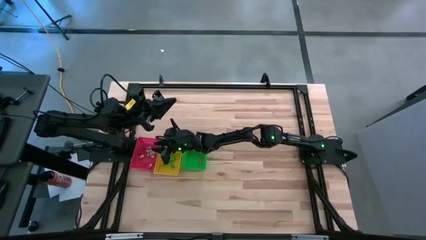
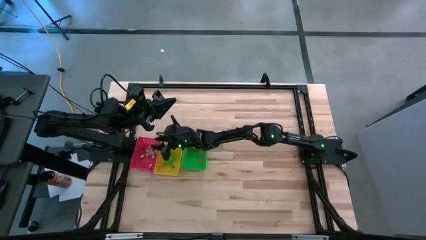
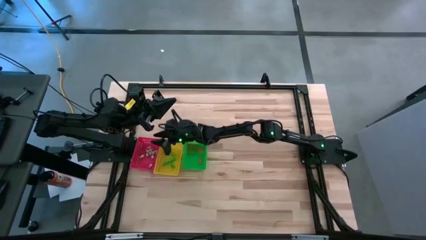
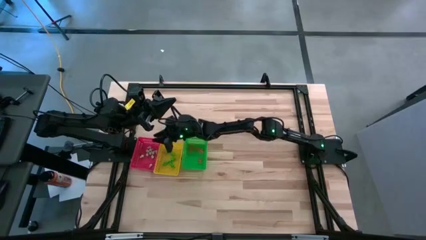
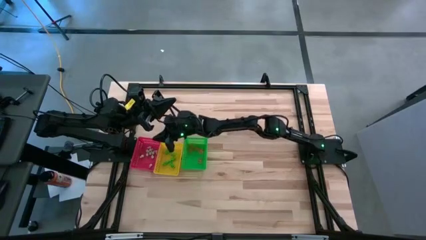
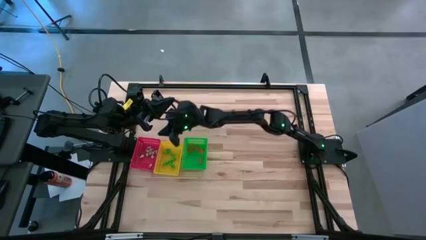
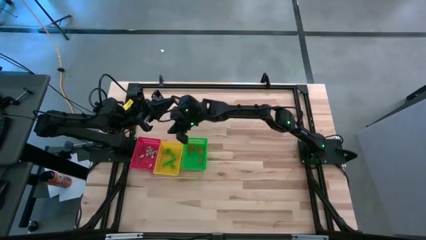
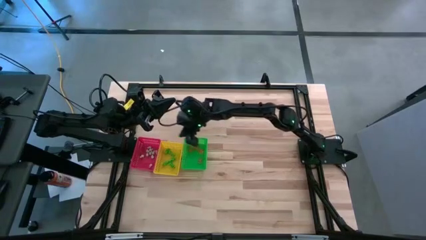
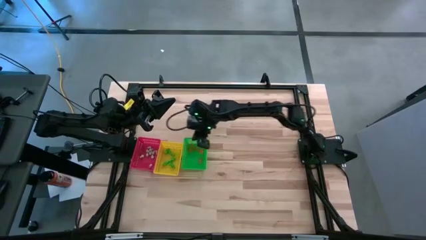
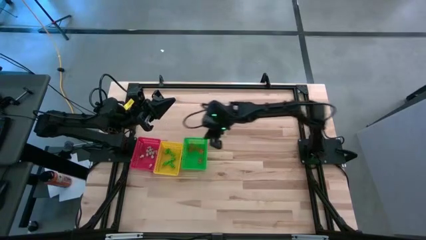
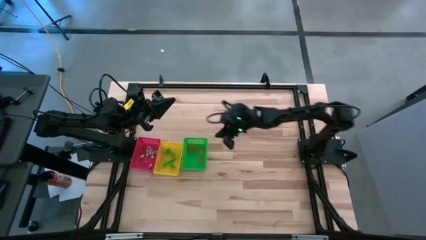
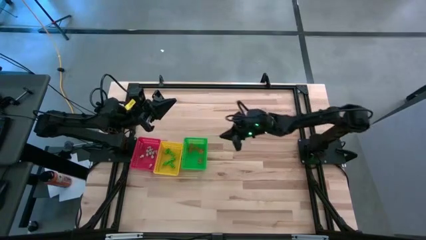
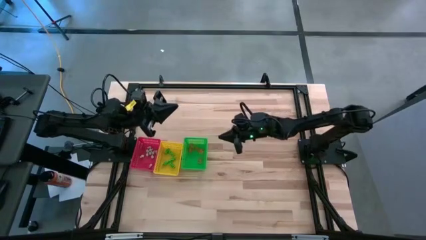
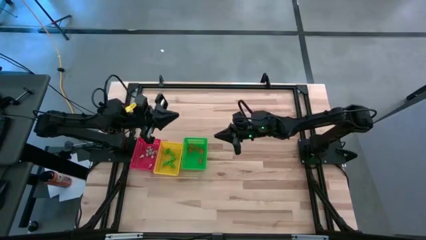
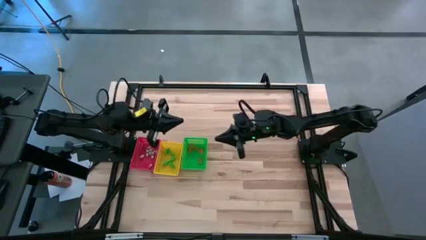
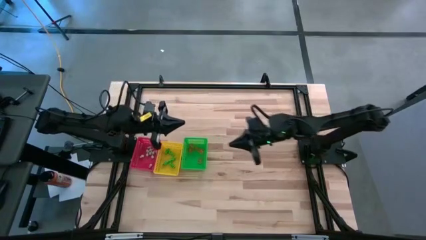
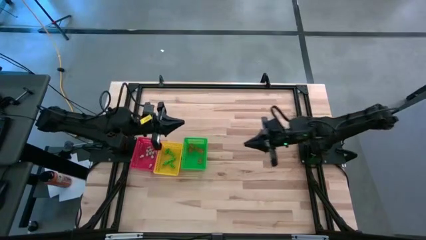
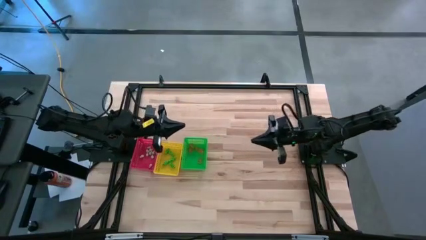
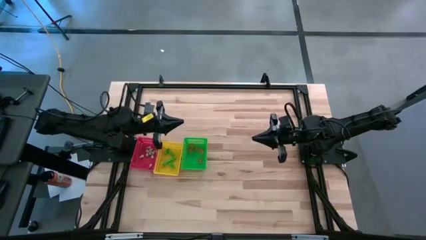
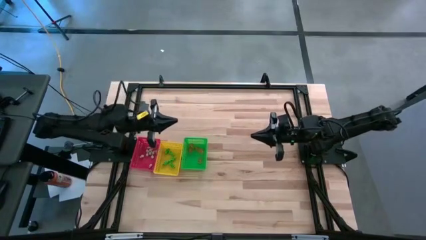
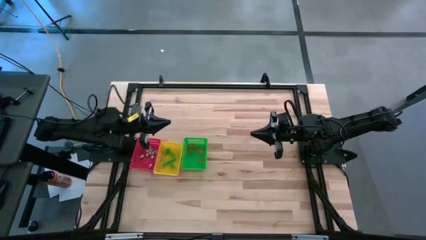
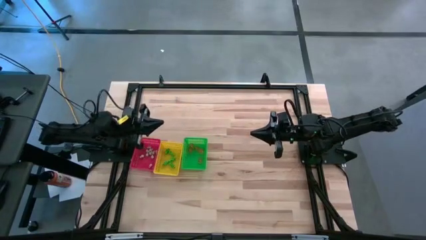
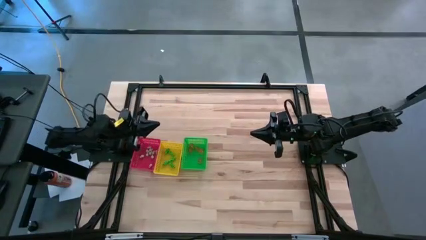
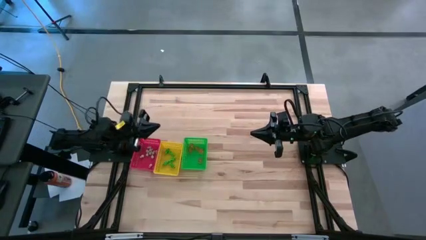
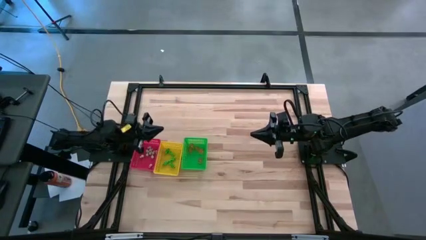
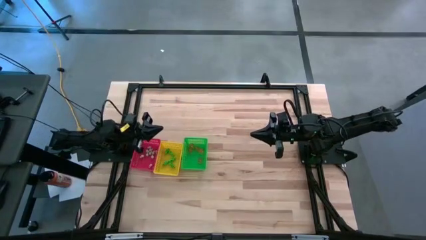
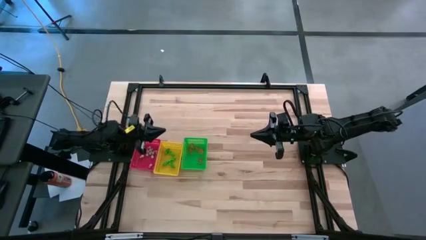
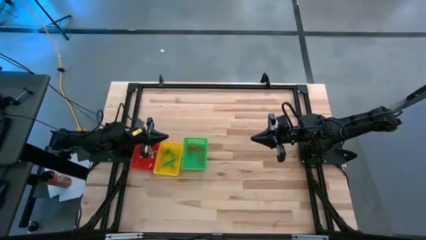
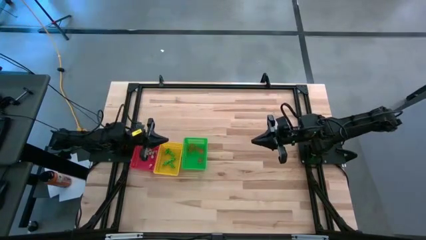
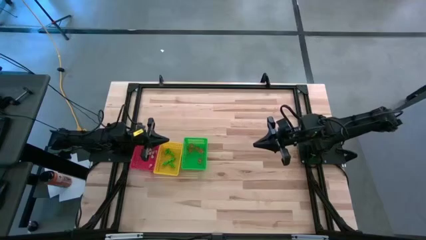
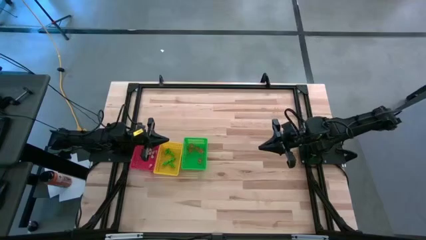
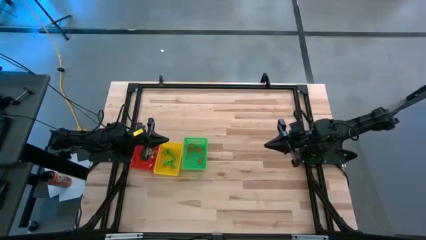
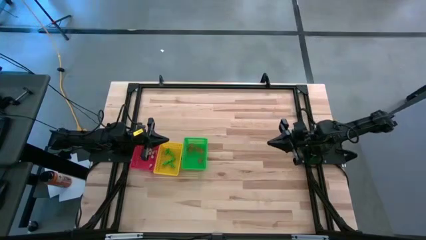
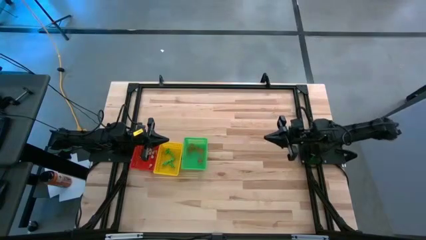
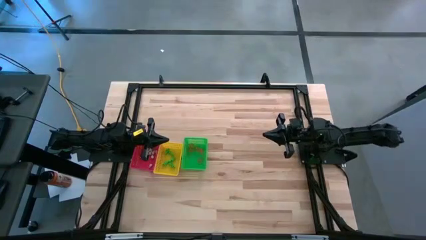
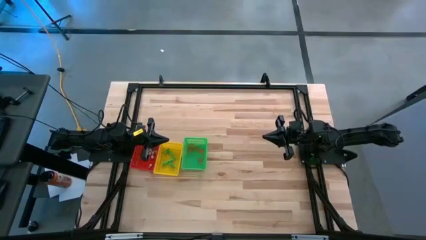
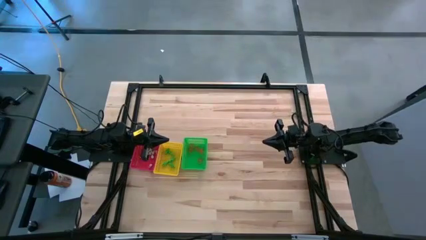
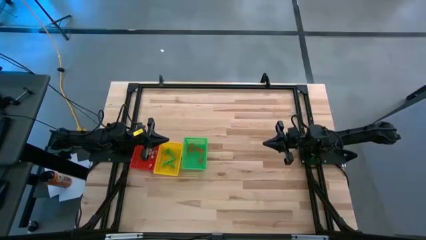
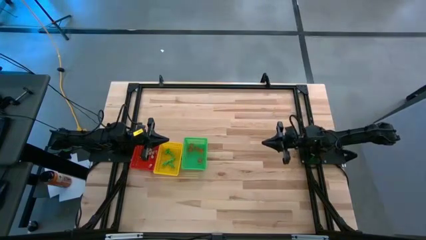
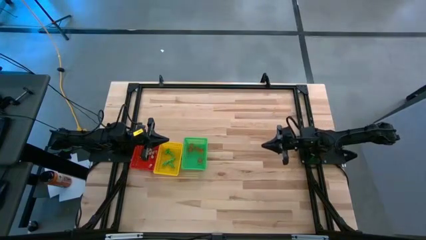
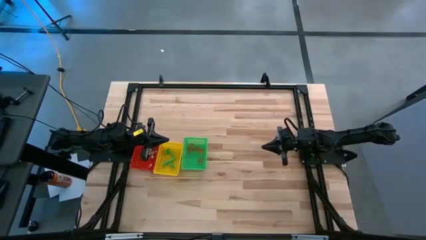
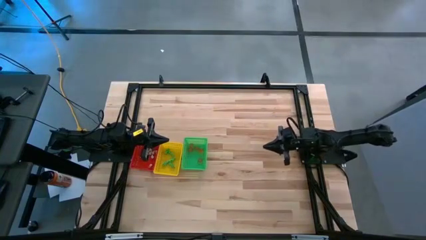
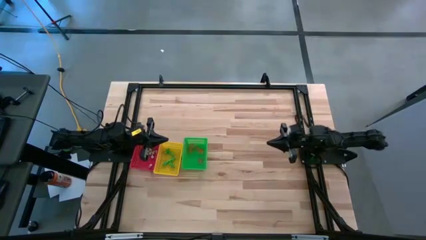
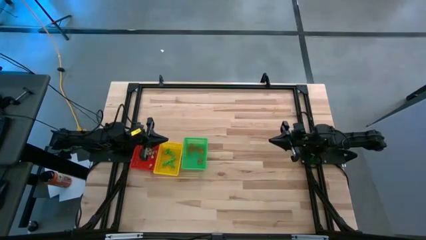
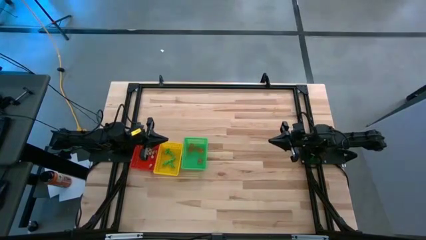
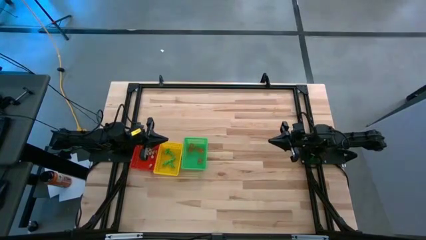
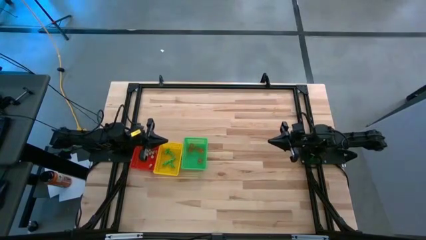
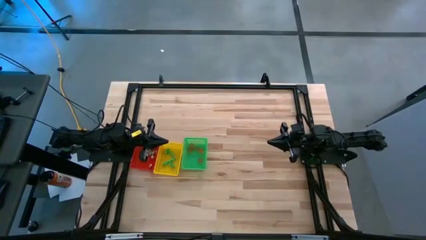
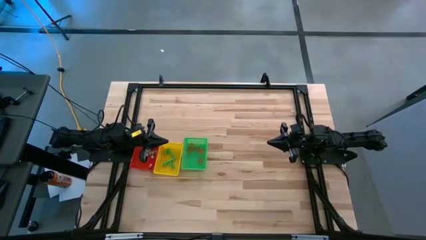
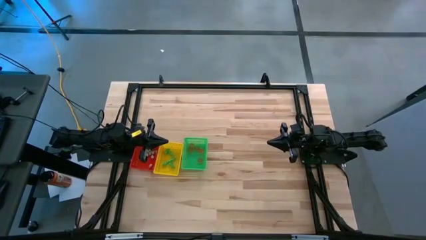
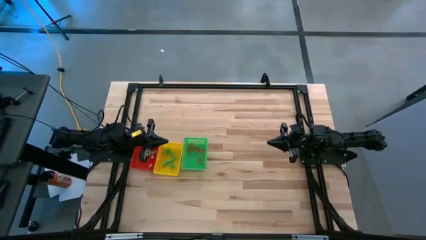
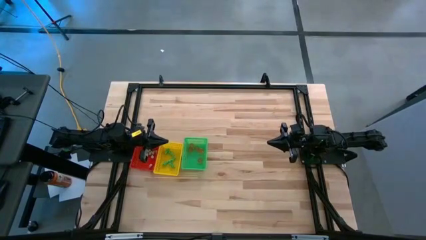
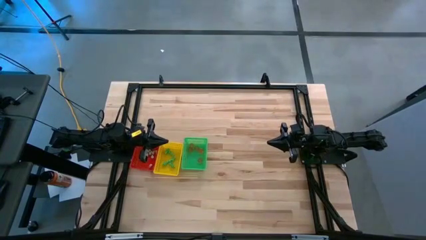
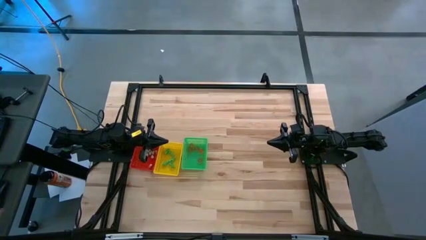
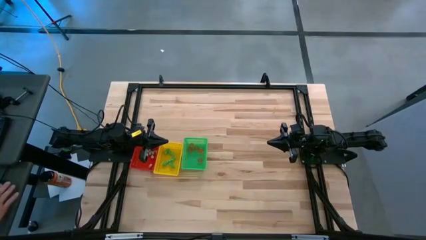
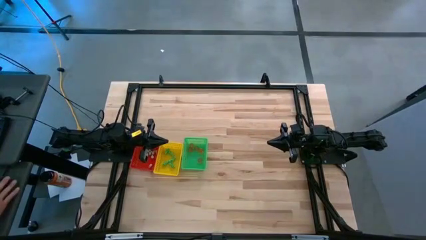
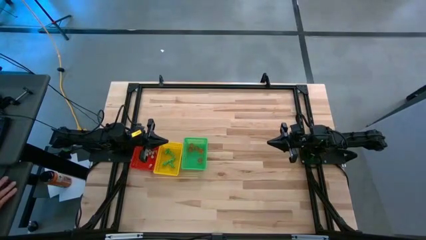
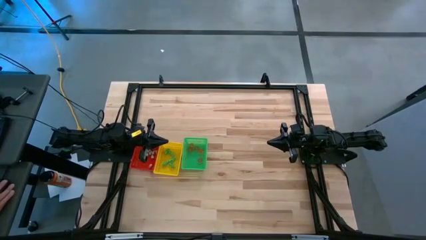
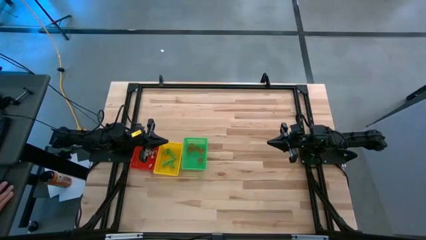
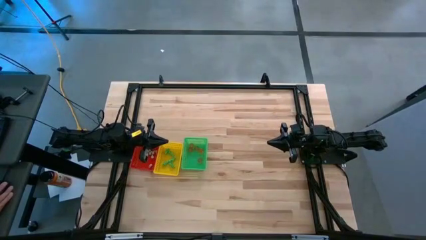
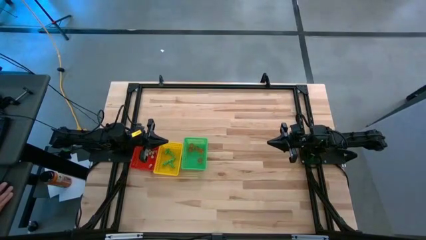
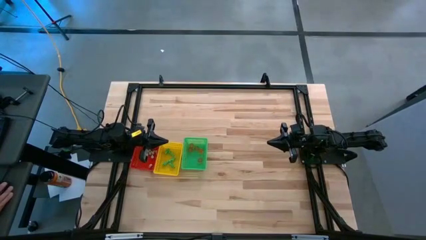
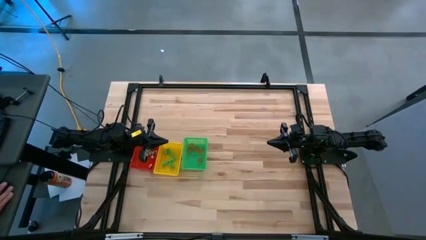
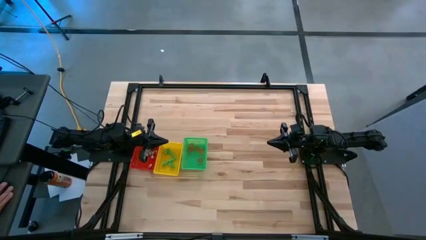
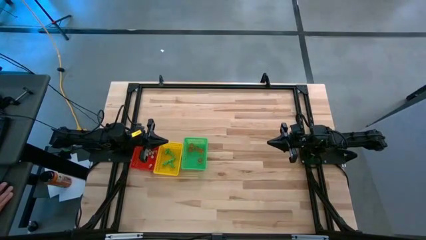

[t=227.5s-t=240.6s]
Task: Sort Halloween decoration
Return to Home Position

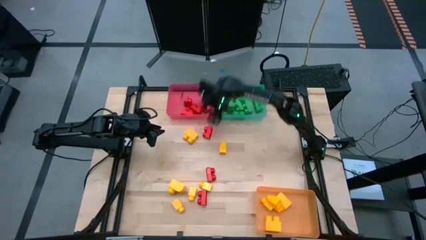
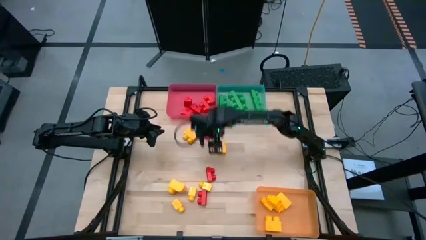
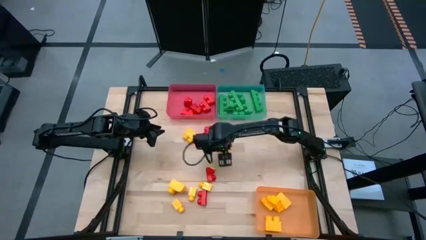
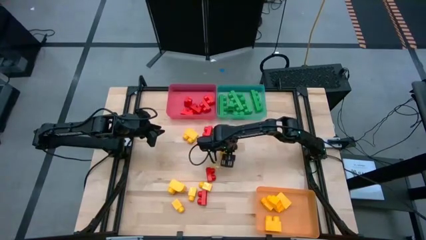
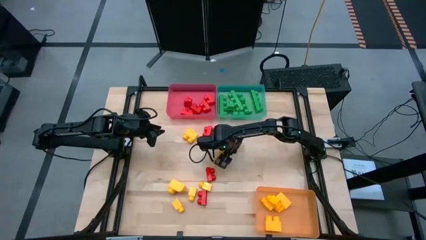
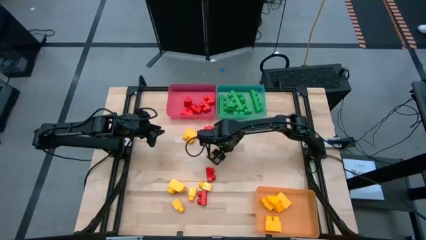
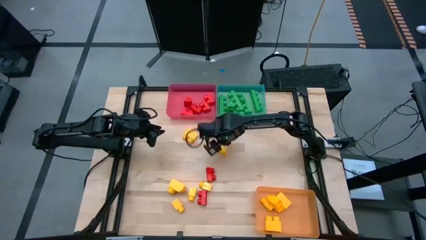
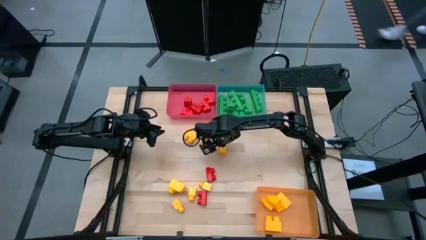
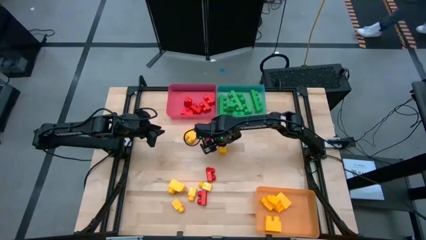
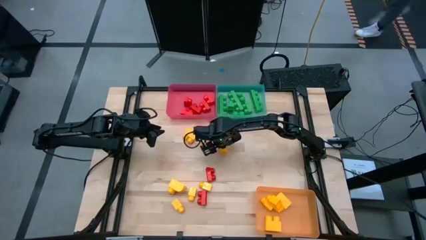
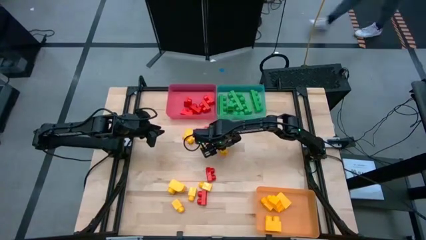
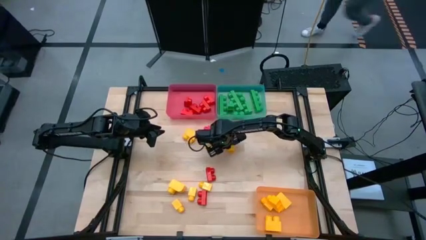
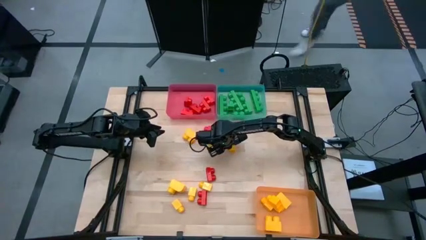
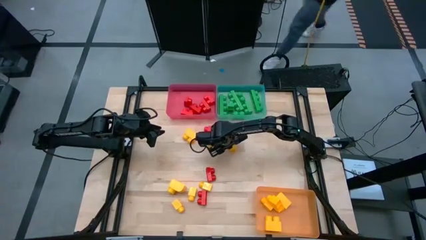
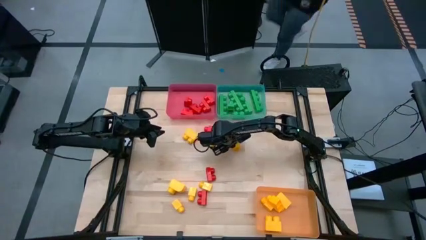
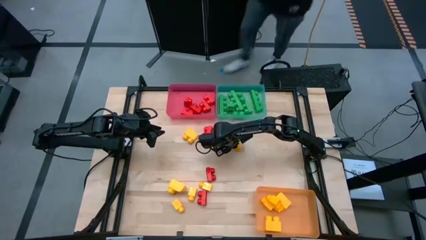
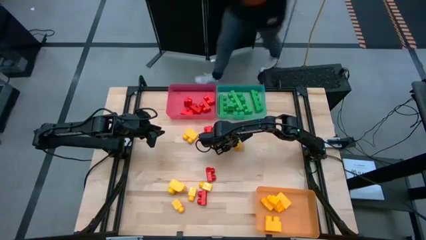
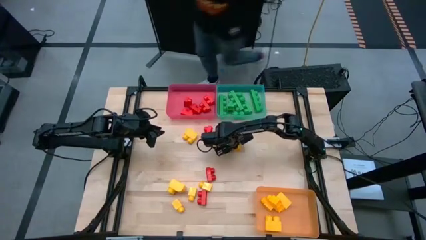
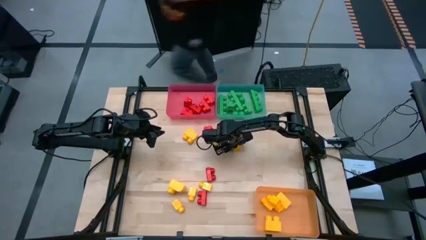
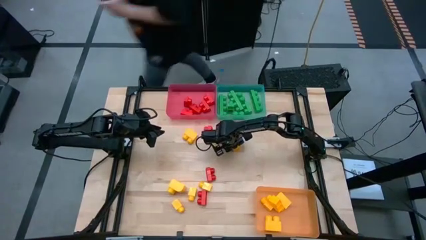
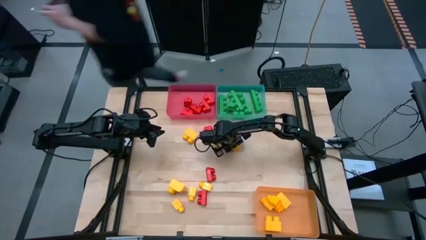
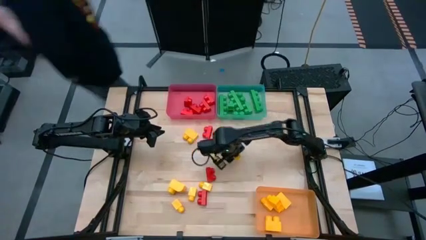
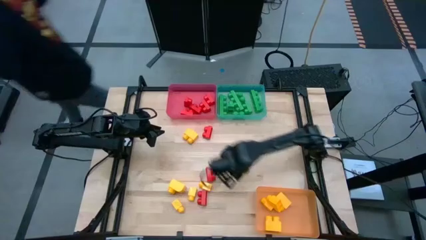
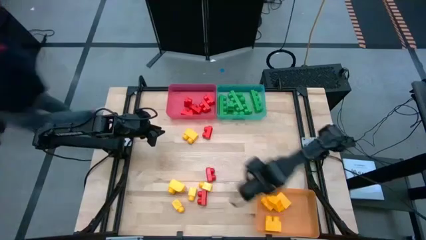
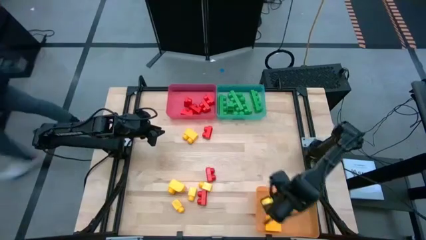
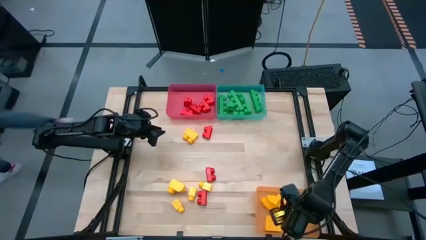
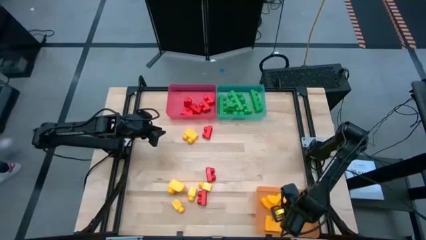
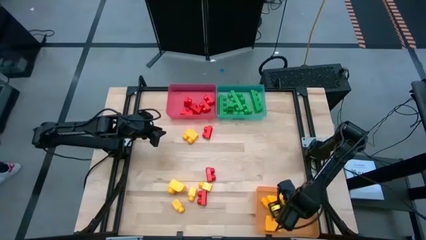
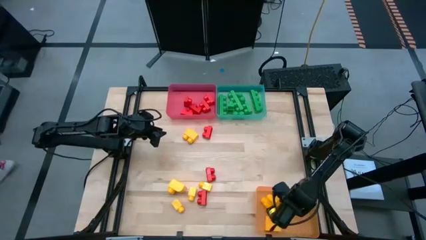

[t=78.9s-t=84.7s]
Task: Sort blocks
Put the yellow game piece into the yellow bin
